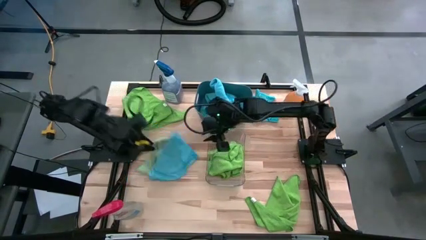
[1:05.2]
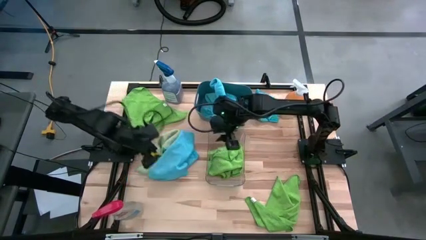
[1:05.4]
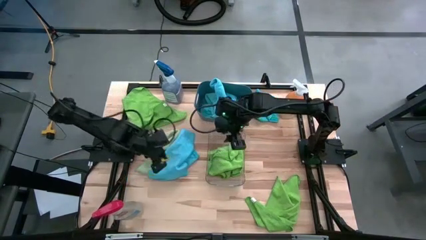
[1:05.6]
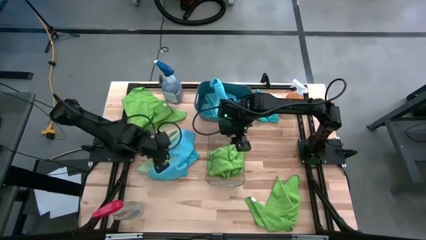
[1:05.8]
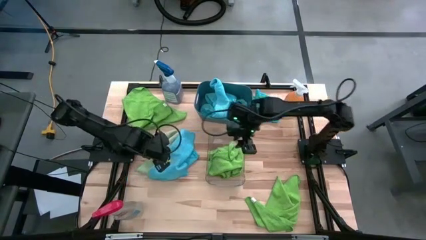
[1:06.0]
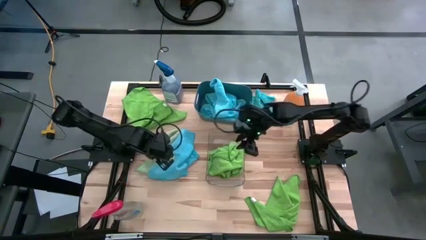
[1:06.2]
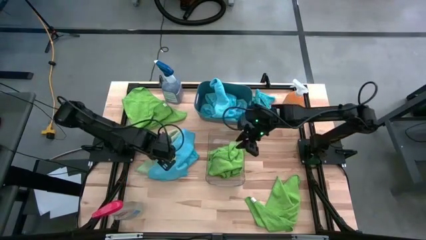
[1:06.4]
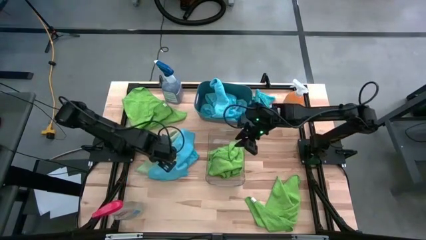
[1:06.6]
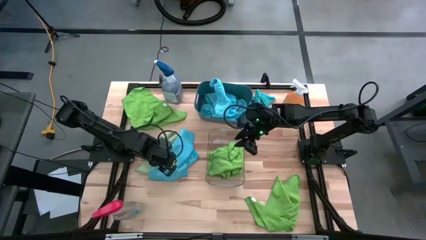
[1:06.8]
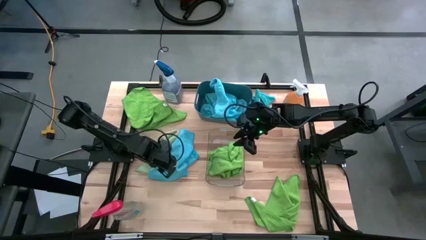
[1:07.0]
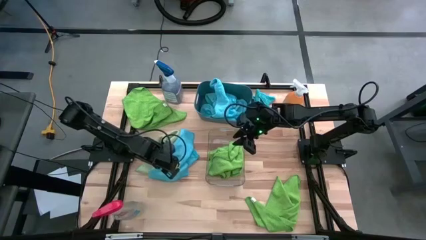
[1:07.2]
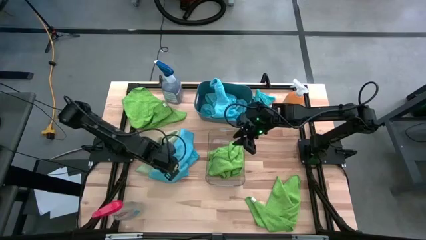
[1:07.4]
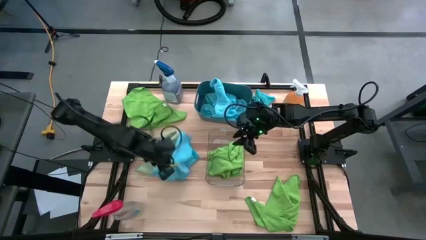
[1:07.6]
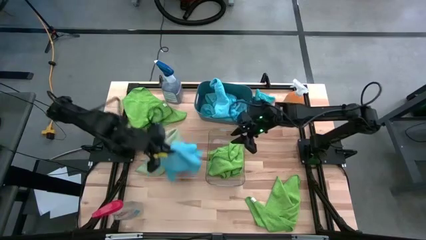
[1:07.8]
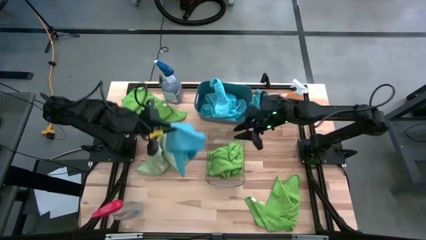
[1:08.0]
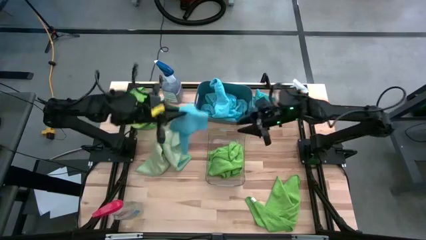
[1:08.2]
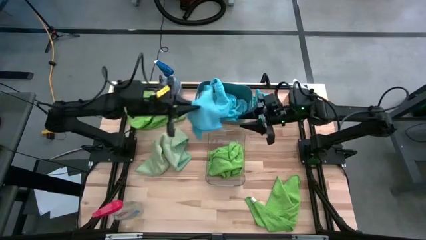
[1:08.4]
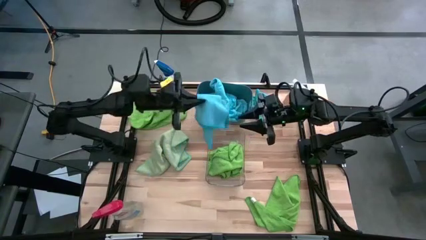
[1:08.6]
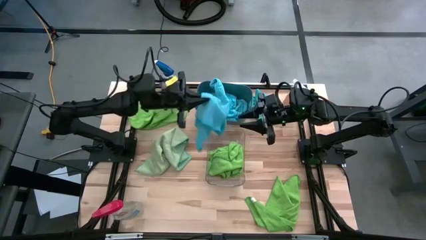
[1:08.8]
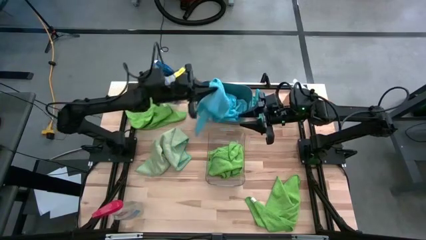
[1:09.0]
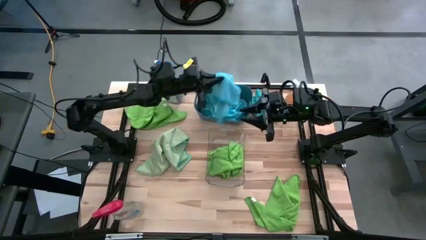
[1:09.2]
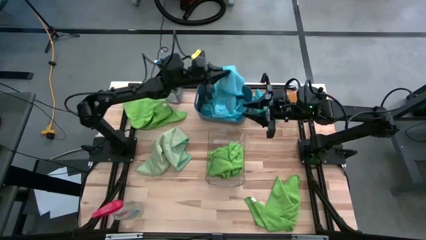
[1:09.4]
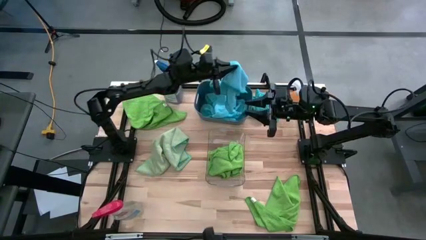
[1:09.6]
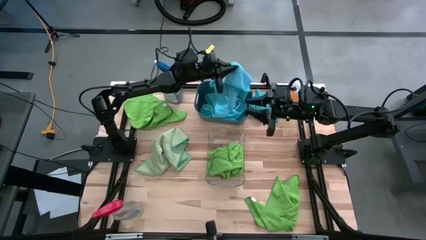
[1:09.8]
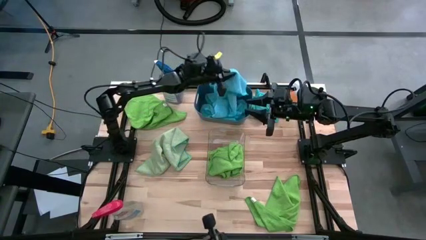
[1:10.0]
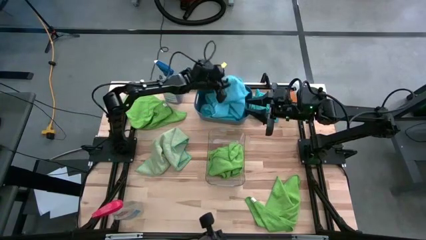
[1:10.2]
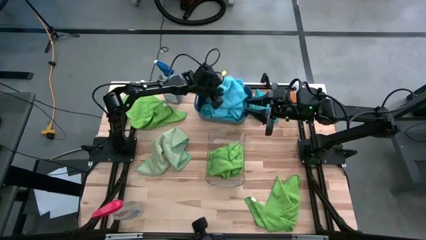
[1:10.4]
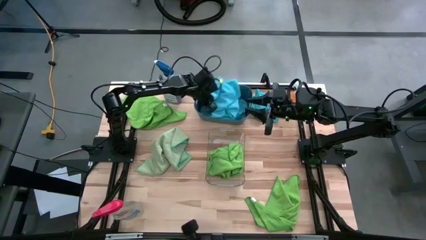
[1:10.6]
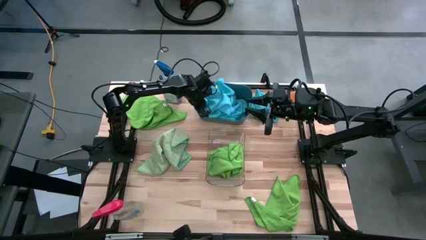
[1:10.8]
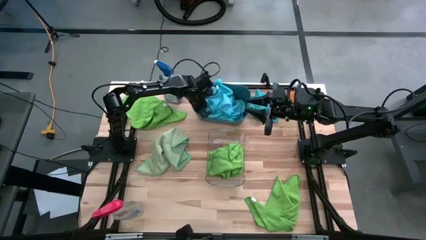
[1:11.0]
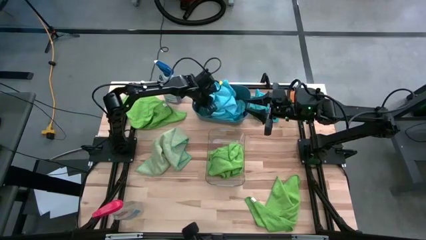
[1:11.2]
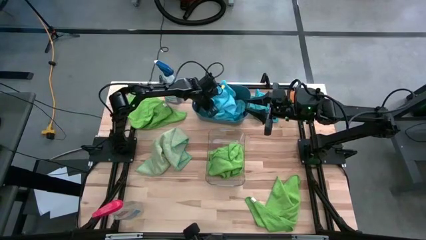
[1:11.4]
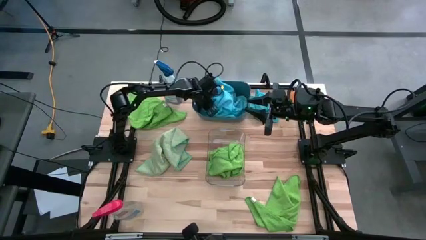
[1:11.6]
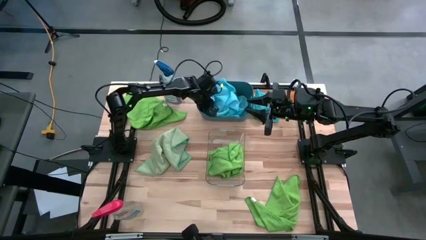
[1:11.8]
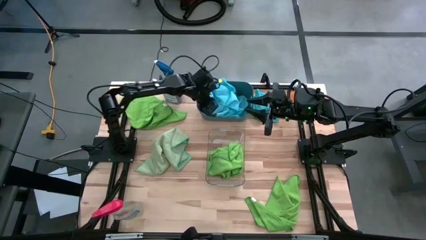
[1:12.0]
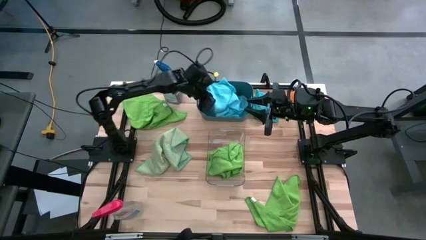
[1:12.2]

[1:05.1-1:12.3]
Task: Sort microfiber towel by color & place in baskets
Put the blue microfiber towel into the blue bin

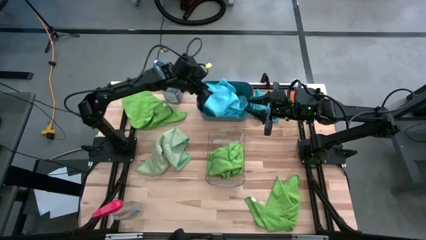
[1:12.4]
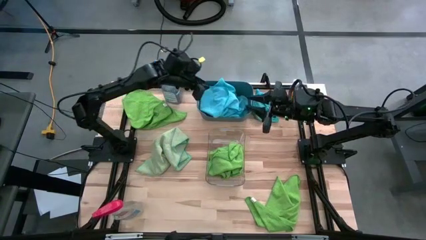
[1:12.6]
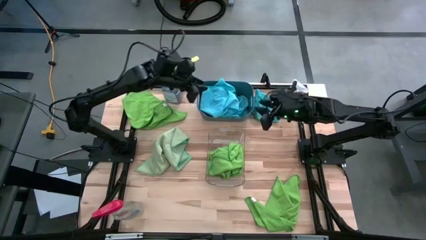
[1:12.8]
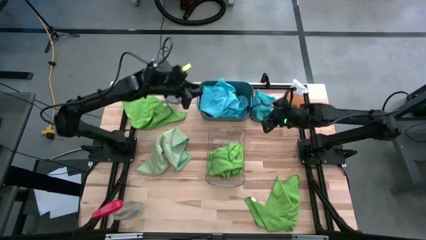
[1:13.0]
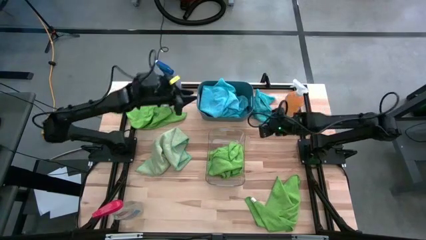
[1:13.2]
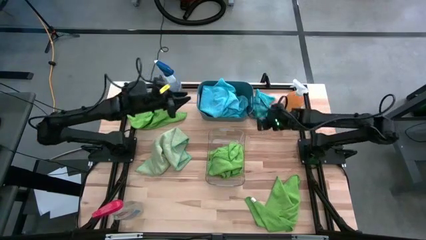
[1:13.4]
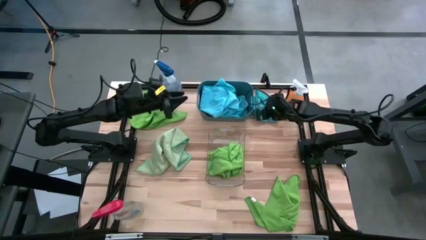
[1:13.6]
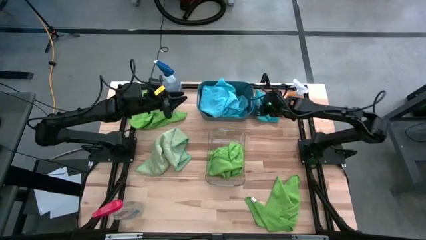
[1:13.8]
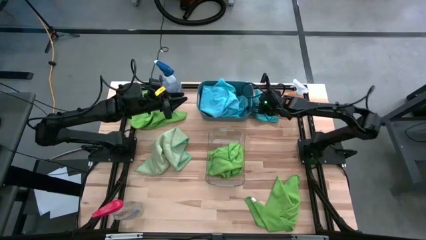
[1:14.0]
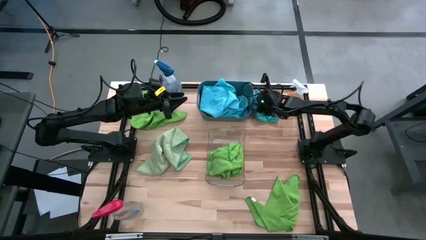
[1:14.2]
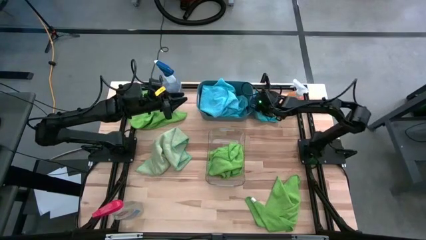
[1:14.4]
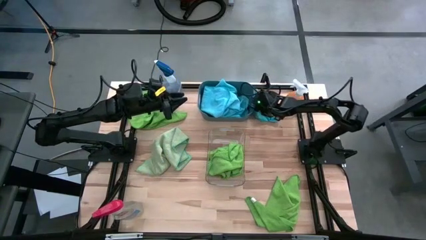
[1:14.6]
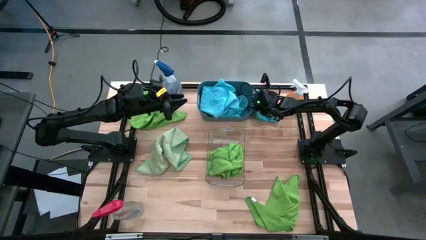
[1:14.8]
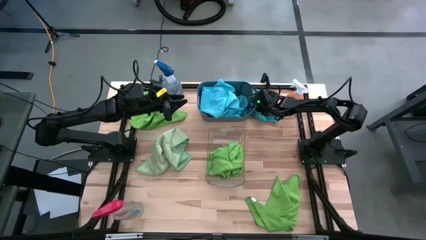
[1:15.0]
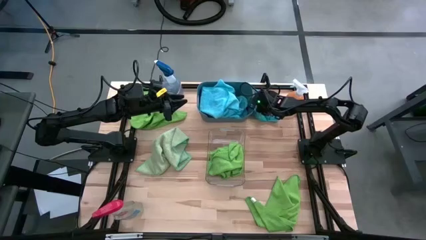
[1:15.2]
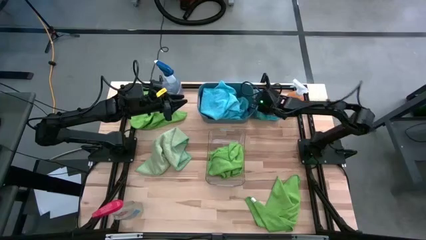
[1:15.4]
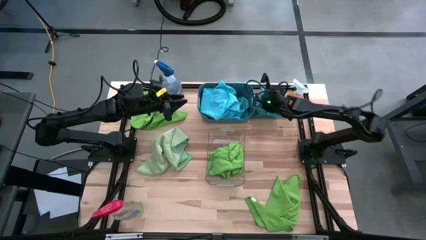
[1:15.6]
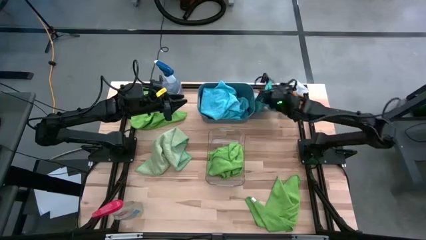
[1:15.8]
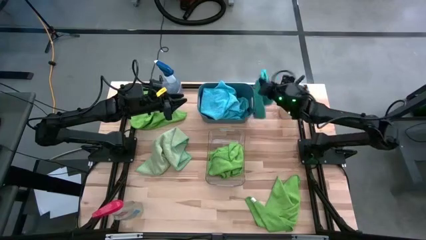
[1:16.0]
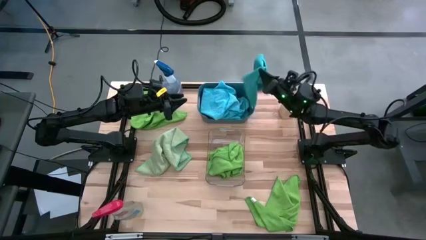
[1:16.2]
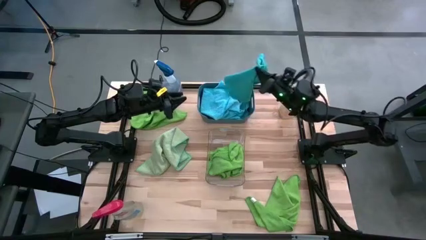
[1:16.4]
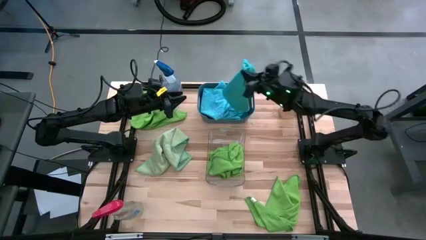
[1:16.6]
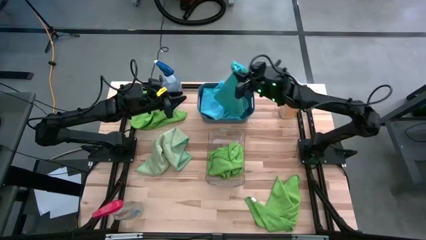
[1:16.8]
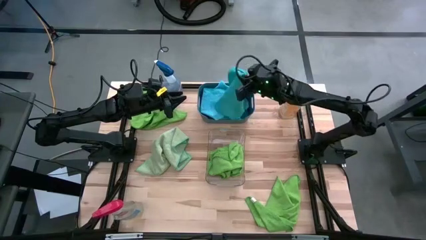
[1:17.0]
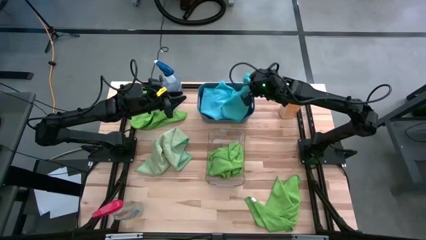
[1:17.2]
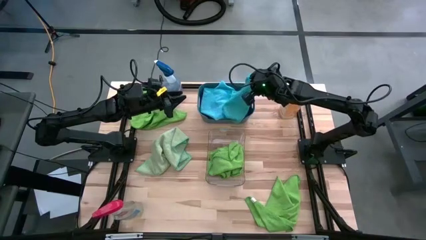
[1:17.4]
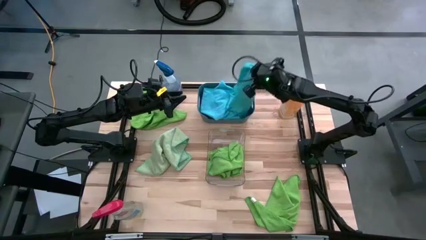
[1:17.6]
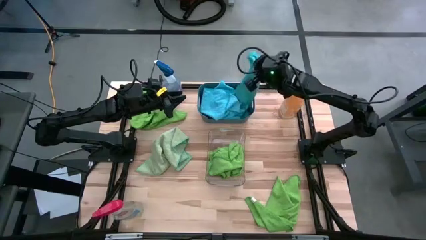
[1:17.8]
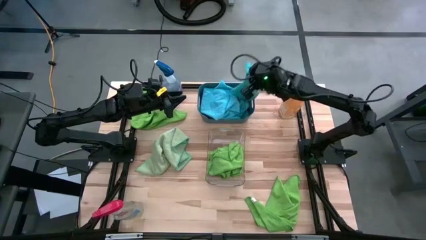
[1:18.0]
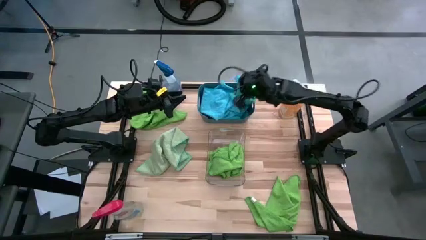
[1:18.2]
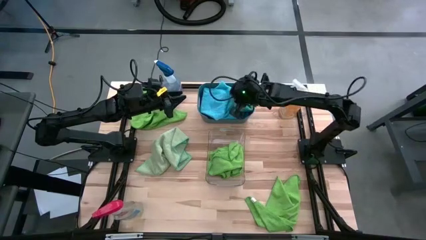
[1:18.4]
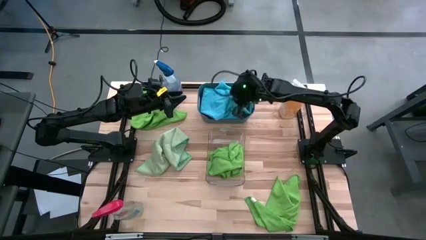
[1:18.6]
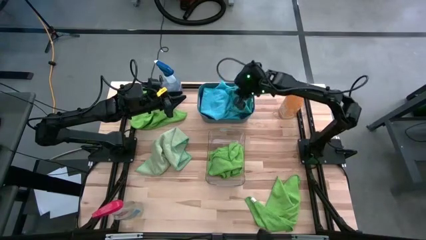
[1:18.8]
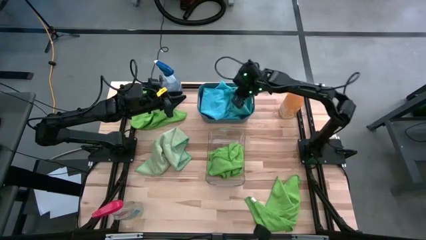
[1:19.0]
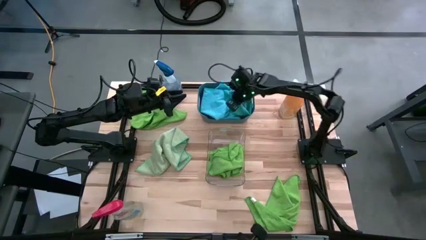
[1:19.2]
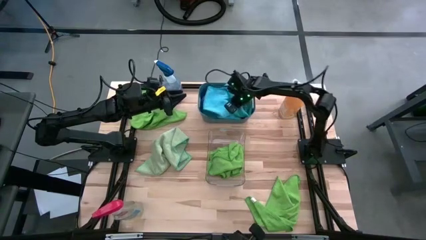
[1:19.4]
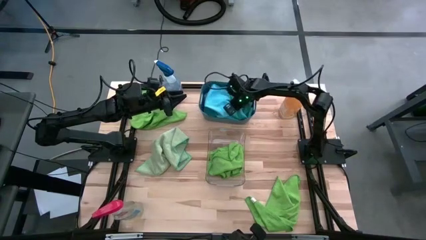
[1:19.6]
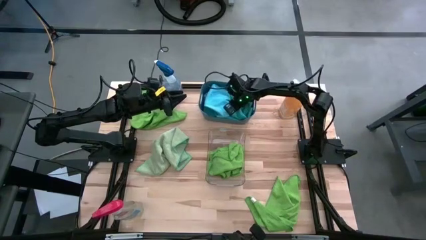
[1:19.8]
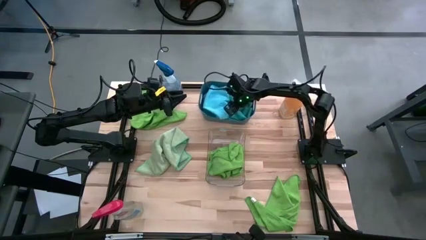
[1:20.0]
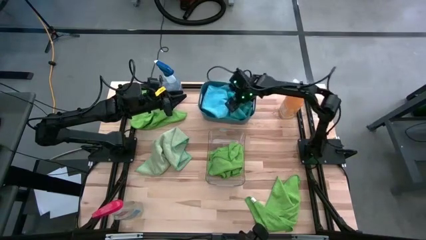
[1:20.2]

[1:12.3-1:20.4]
Put the blue microfiber towel into the blue bin
